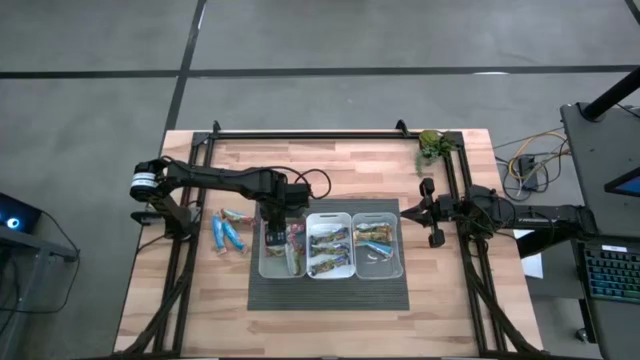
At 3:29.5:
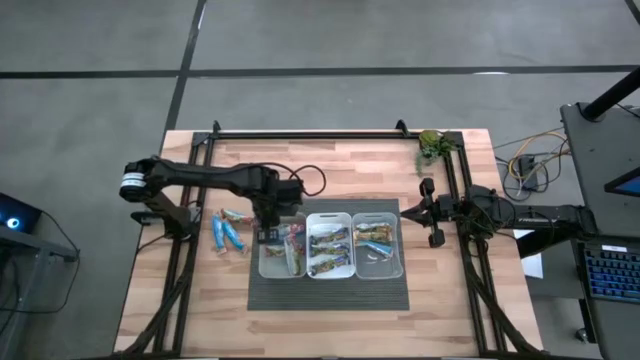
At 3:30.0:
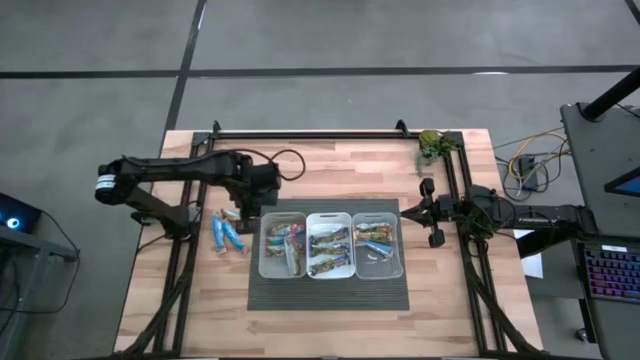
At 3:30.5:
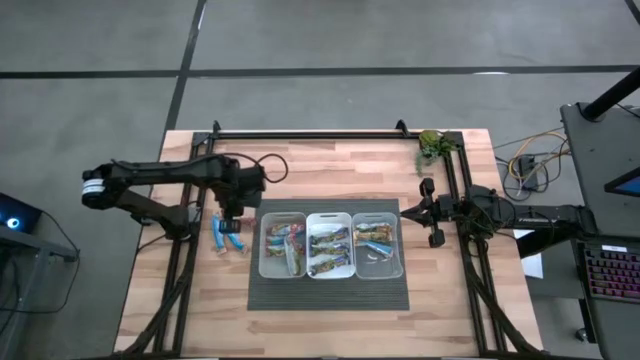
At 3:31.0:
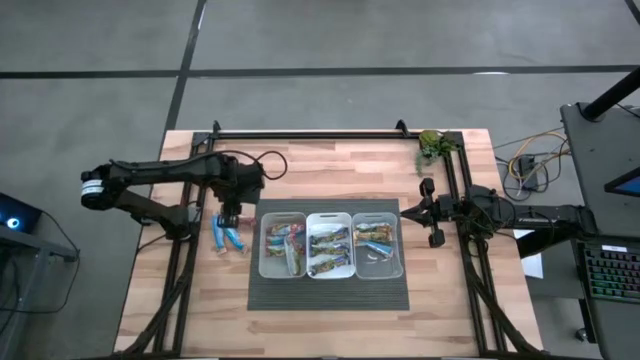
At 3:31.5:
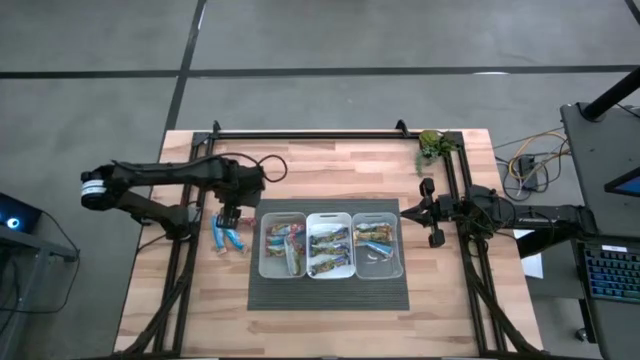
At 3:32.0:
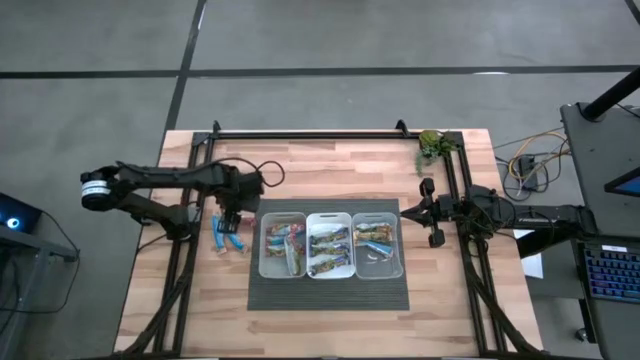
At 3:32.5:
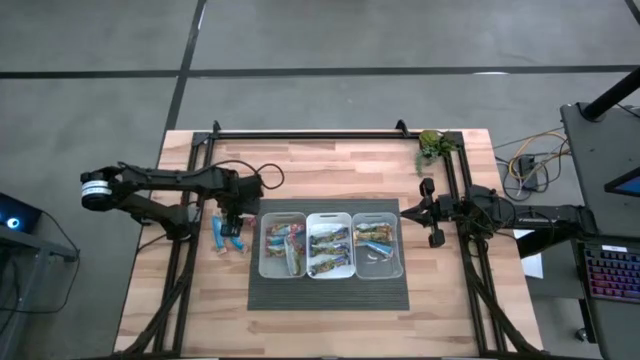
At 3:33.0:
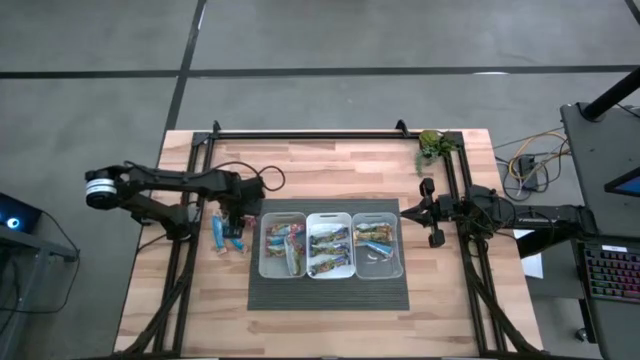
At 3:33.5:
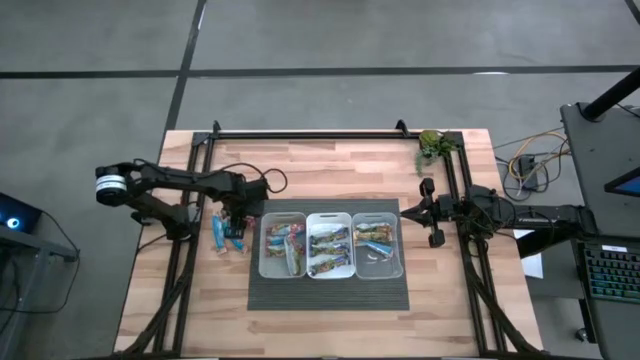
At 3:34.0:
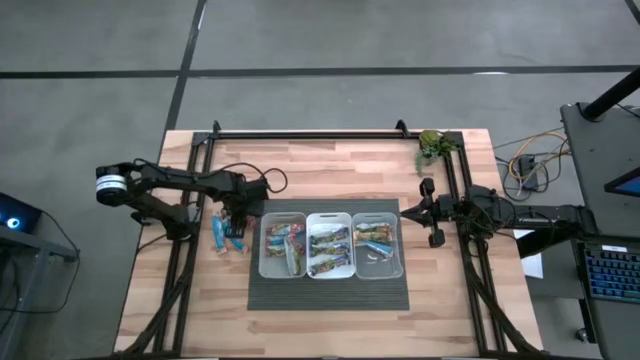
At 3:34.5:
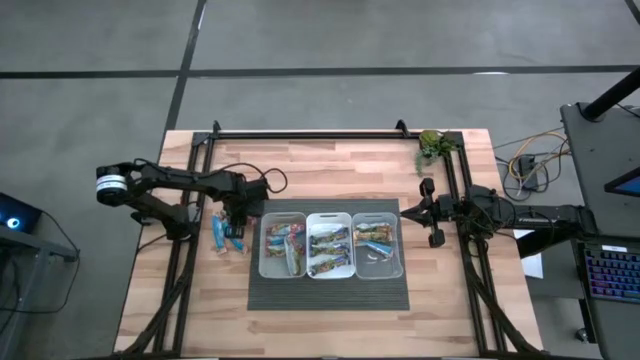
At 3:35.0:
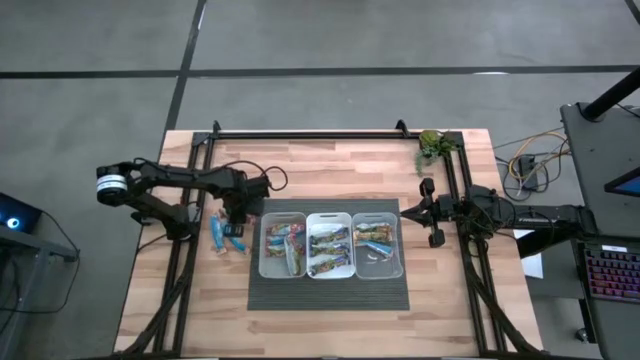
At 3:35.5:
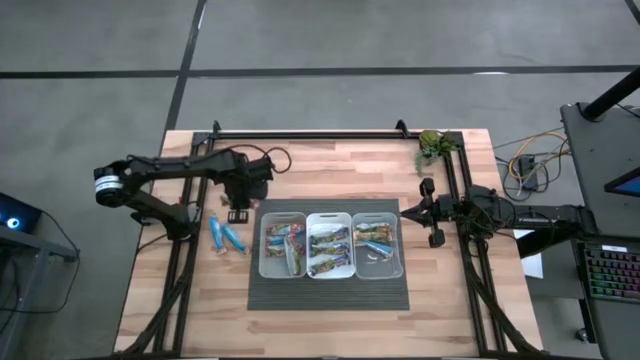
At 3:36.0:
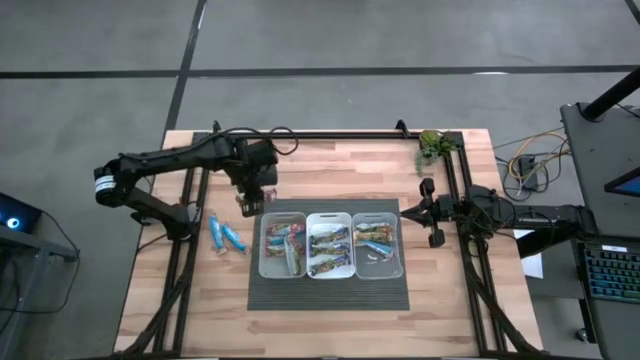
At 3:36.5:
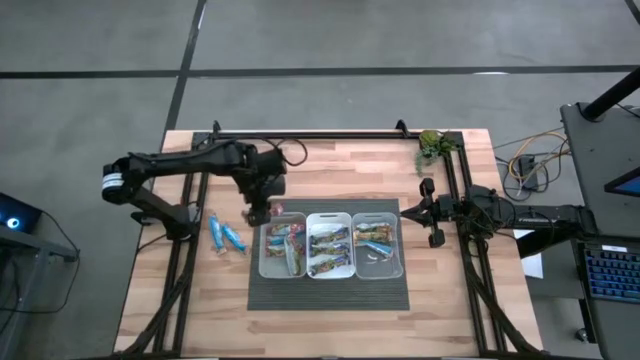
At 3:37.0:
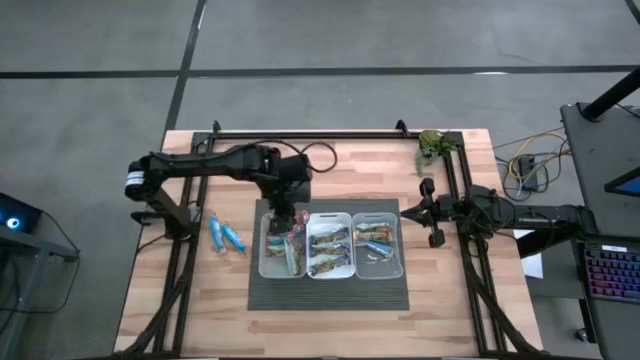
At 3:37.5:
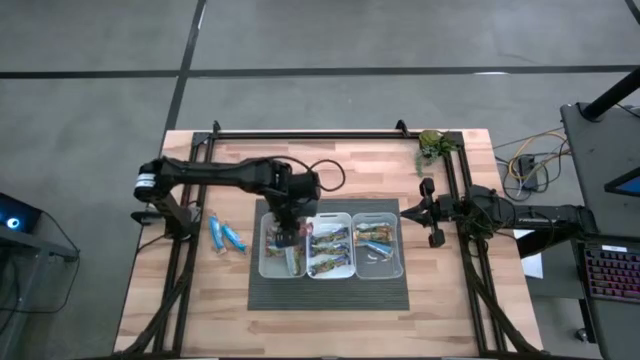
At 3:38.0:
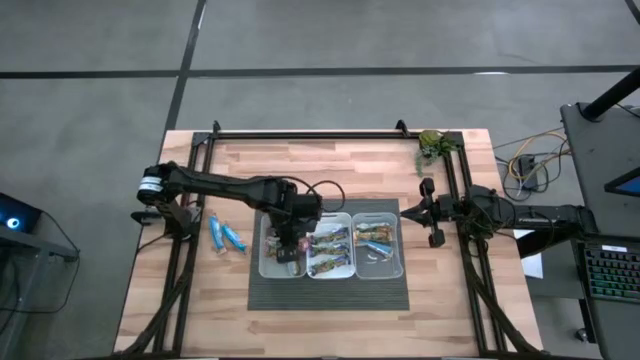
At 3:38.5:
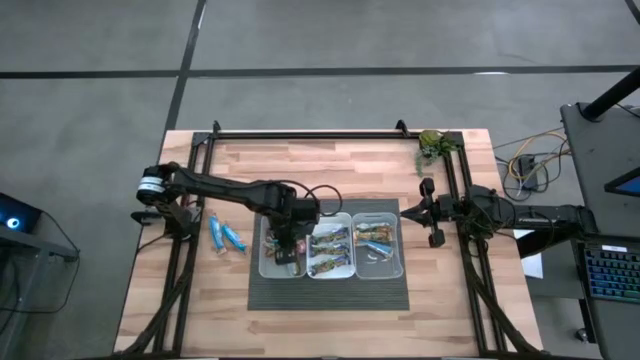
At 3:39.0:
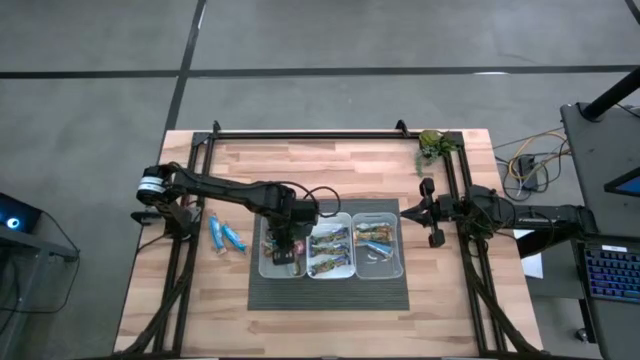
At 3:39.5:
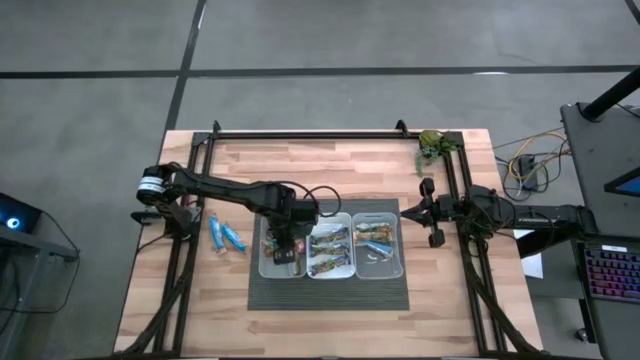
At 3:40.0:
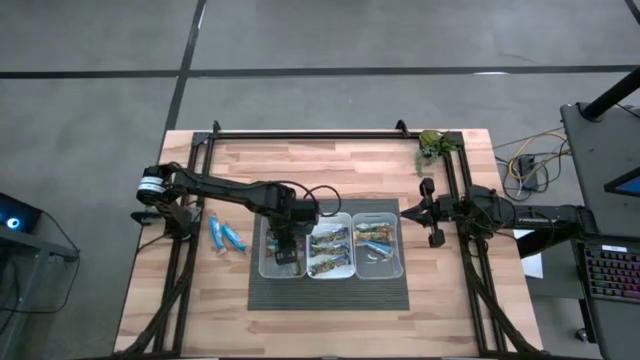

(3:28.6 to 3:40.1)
Task: Pick and place Granola Bars by type
Put the red granola bar into the gray bin

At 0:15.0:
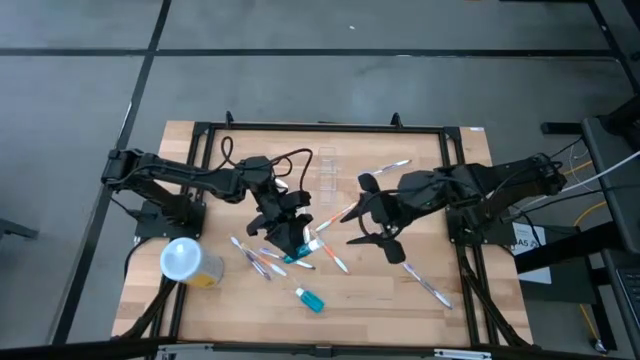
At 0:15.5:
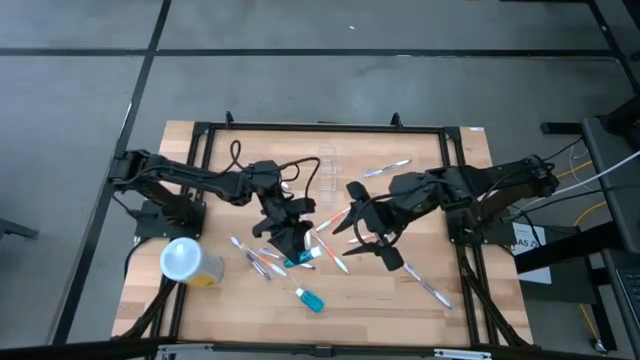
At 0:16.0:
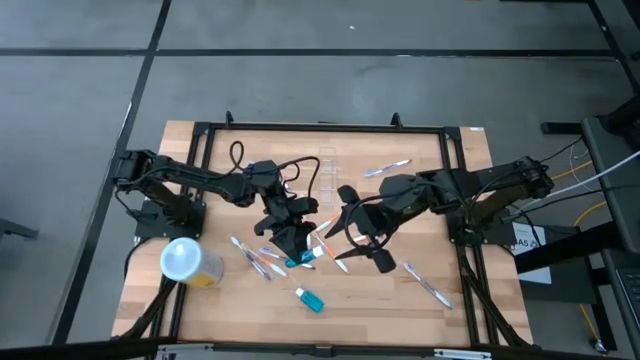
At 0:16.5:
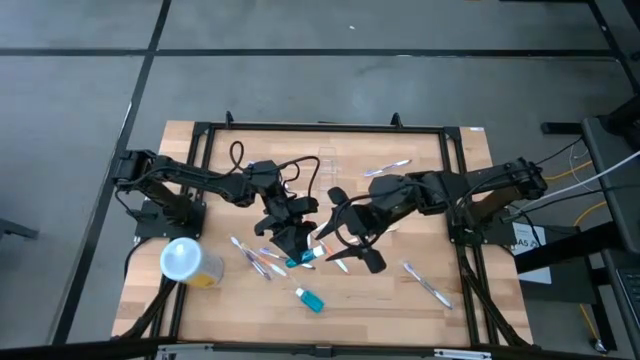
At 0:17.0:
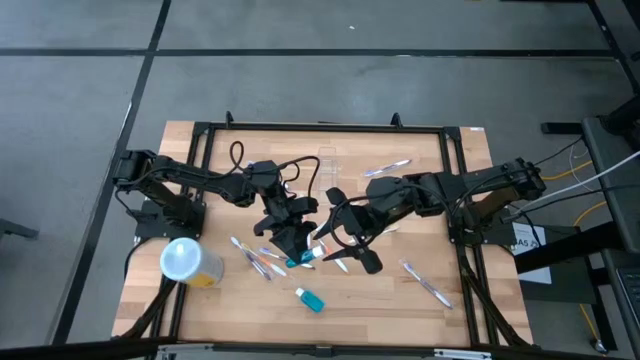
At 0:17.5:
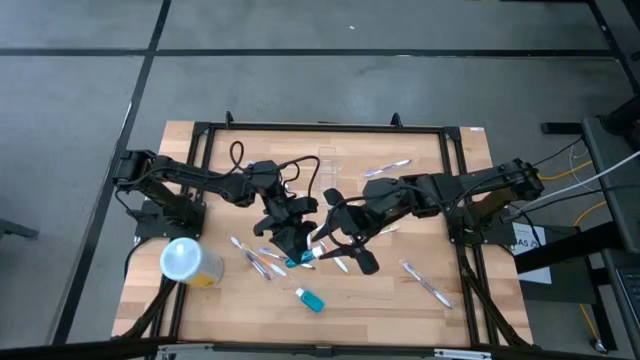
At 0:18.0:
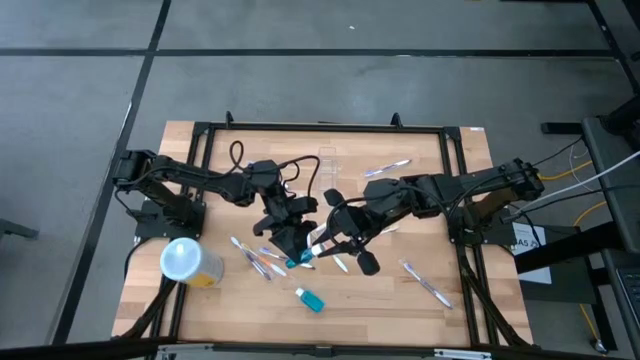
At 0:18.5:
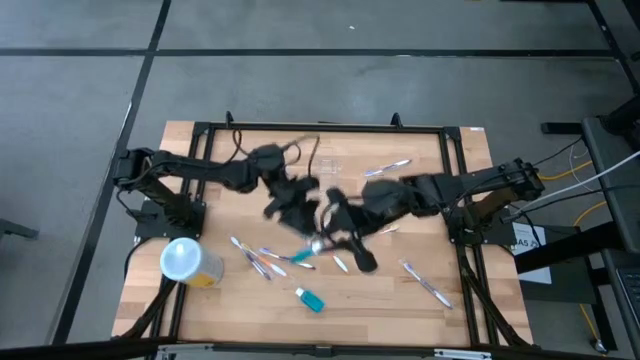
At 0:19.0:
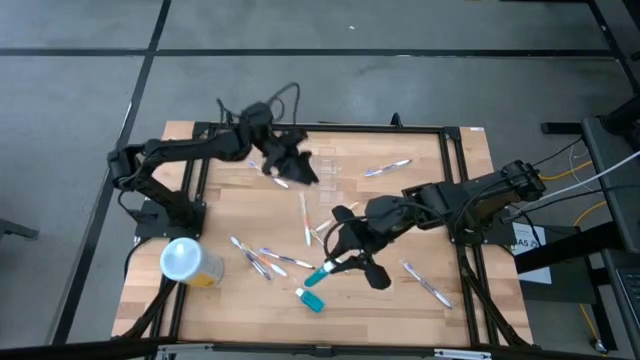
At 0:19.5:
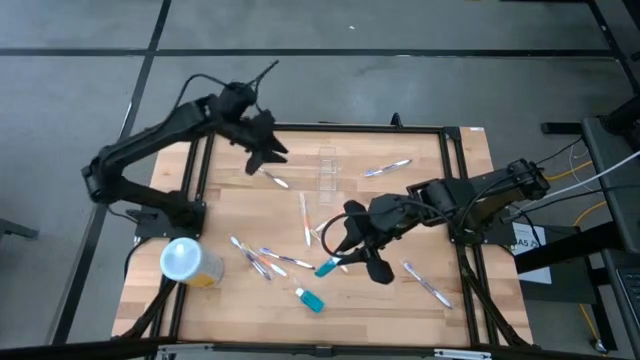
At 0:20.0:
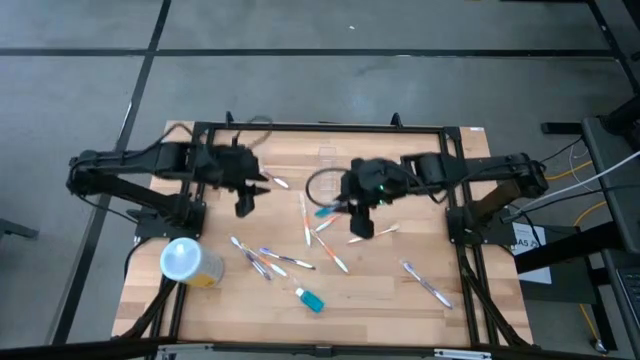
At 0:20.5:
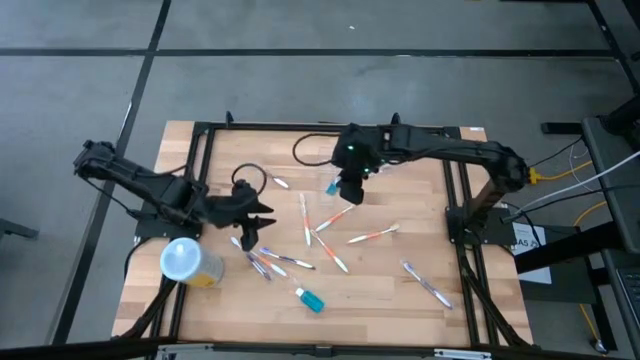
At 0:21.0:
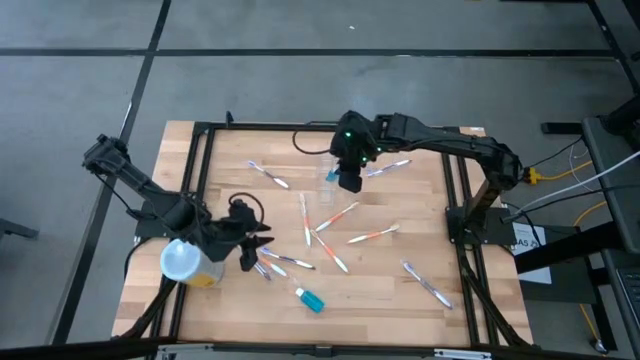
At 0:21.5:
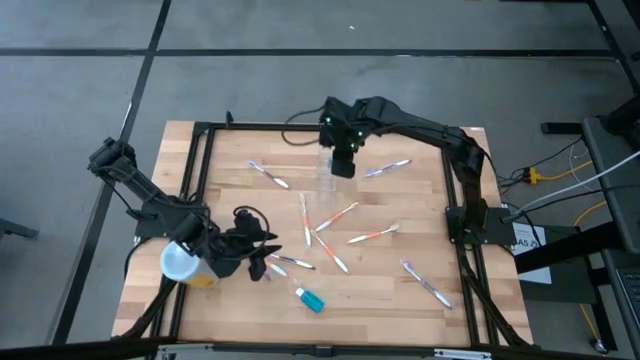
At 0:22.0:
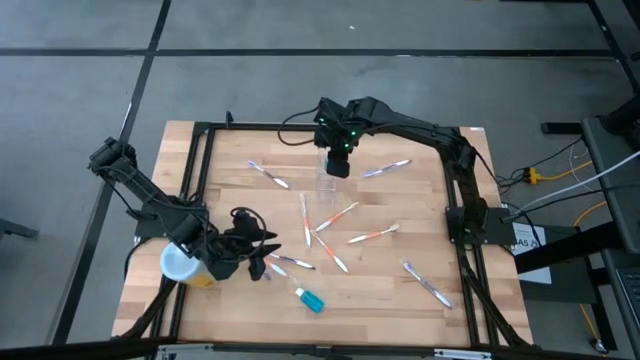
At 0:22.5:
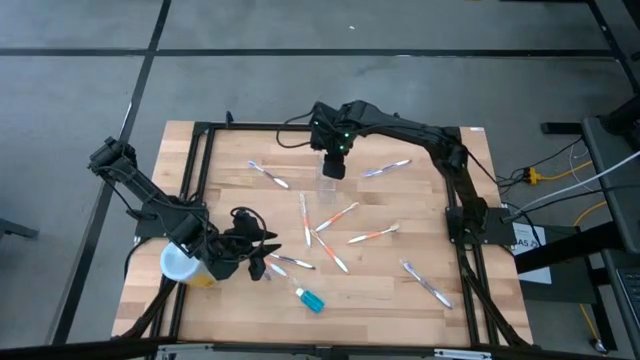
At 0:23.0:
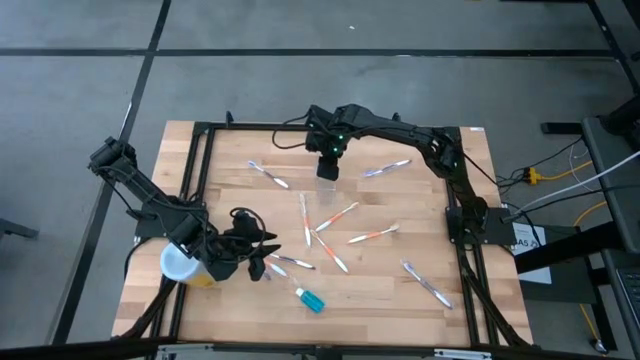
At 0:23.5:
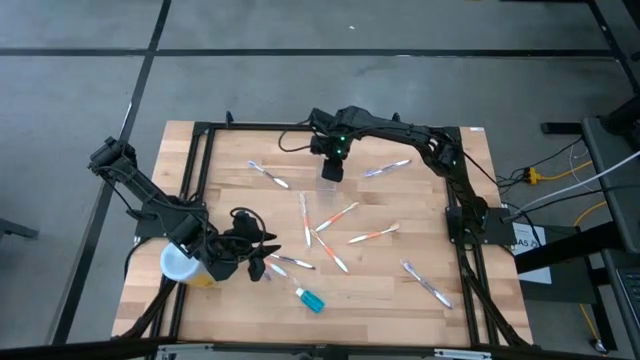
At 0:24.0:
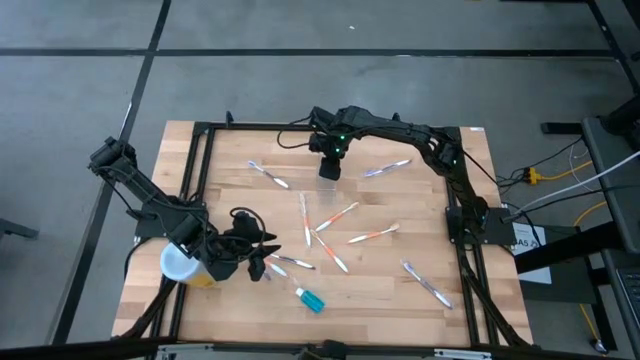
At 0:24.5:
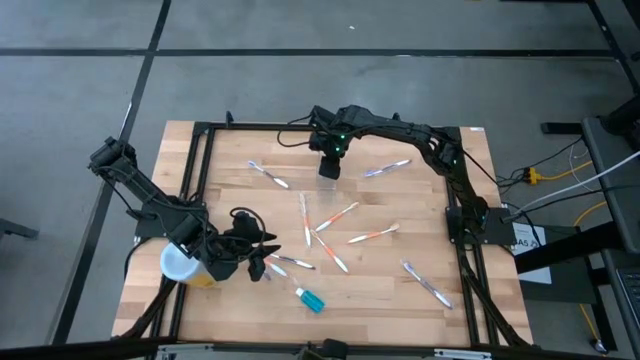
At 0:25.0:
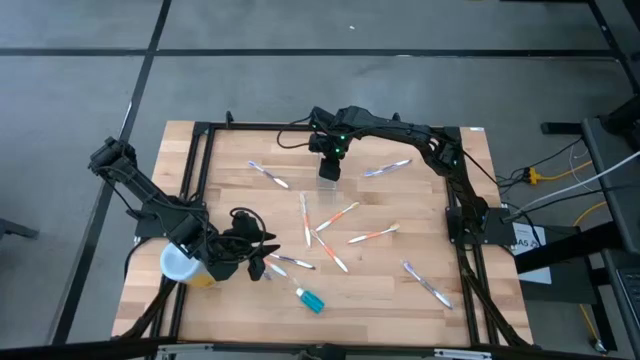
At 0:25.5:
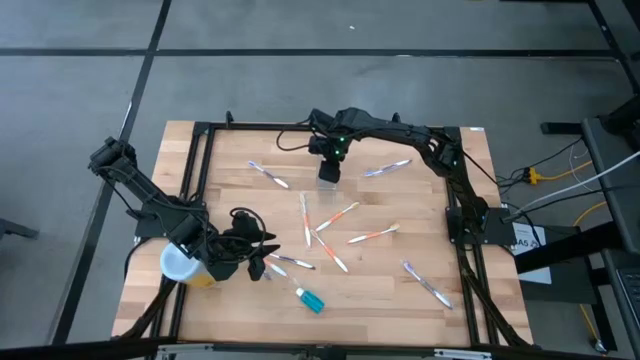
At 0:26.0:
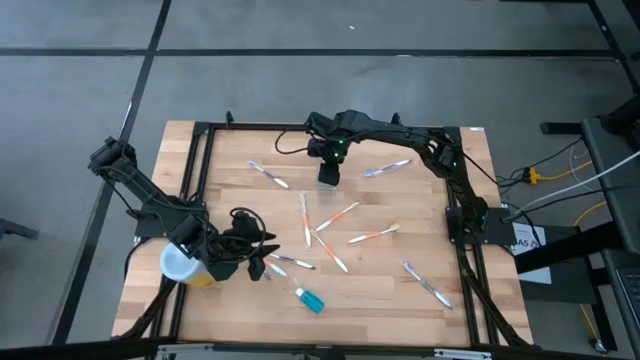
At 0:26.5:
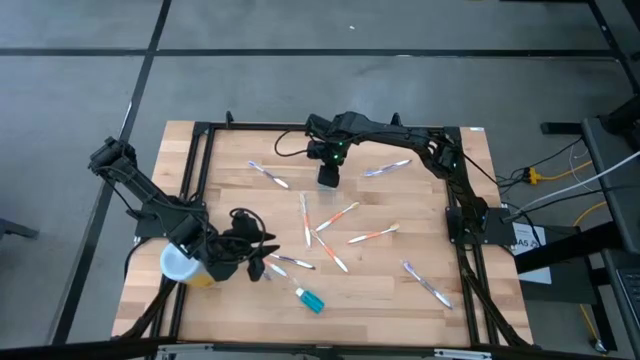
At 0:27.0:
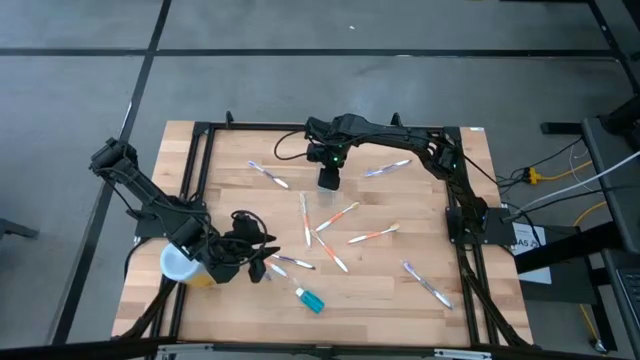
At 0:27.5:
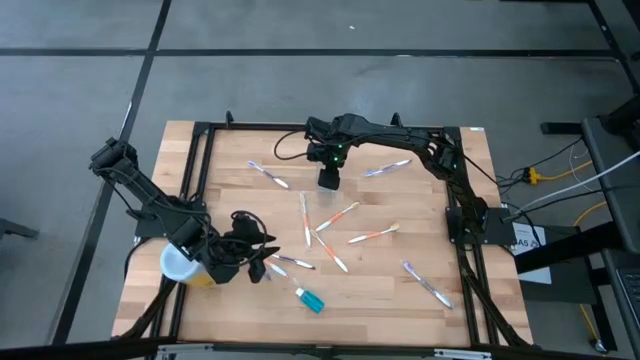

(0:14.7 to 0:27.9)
Task: Pick & Place toothbrushing station
Put the blue mouthwash into the transparent organizer
